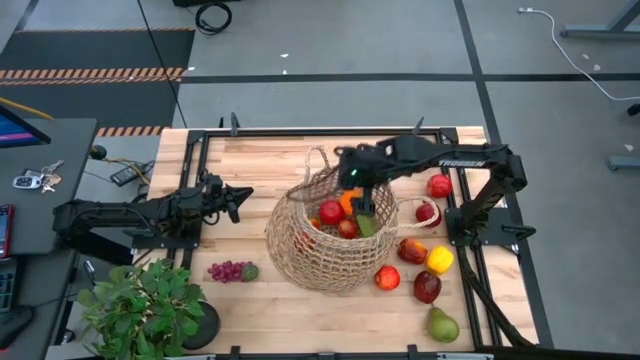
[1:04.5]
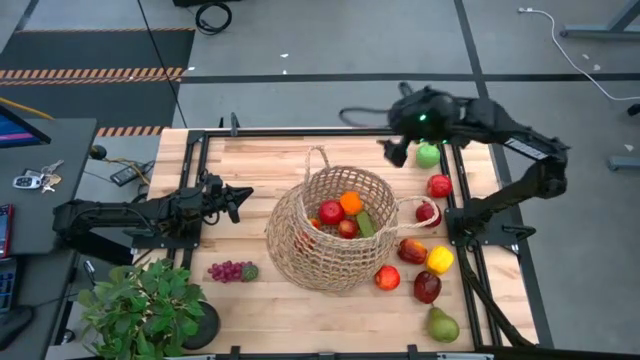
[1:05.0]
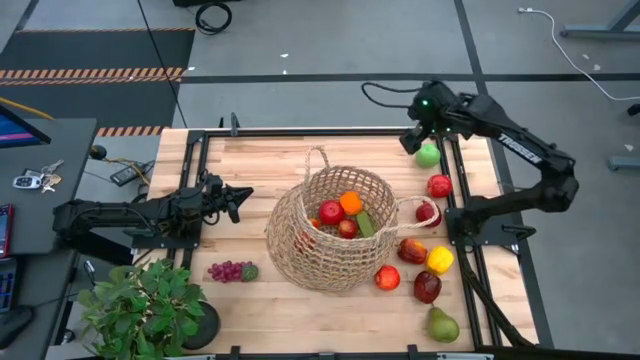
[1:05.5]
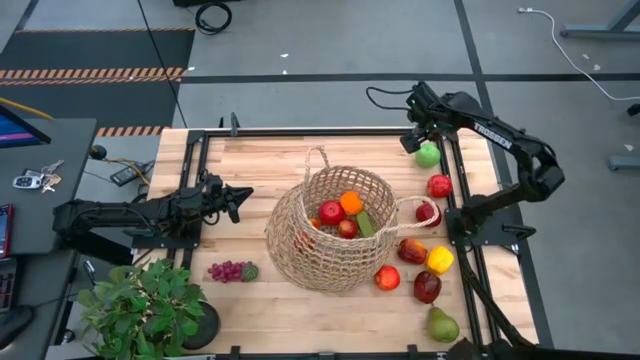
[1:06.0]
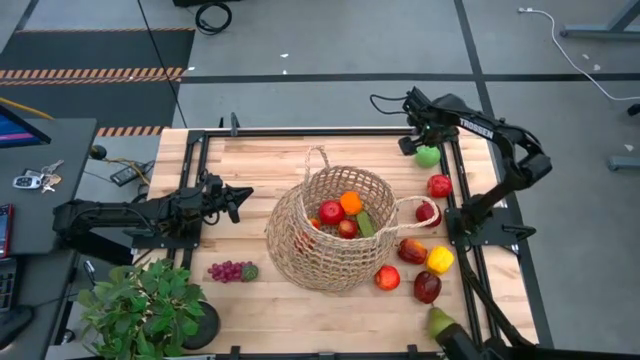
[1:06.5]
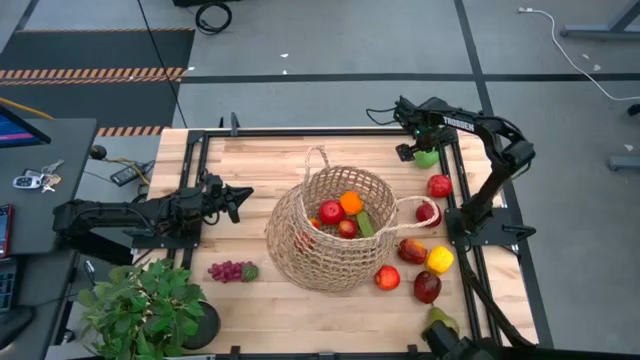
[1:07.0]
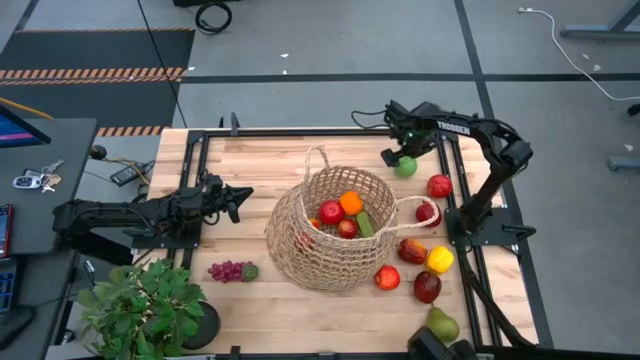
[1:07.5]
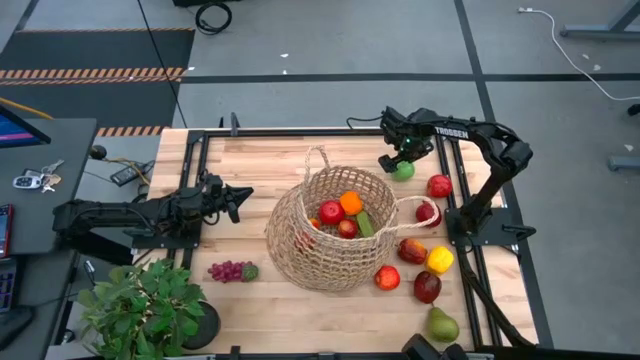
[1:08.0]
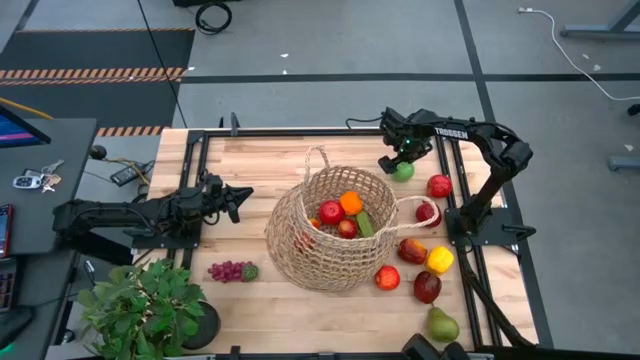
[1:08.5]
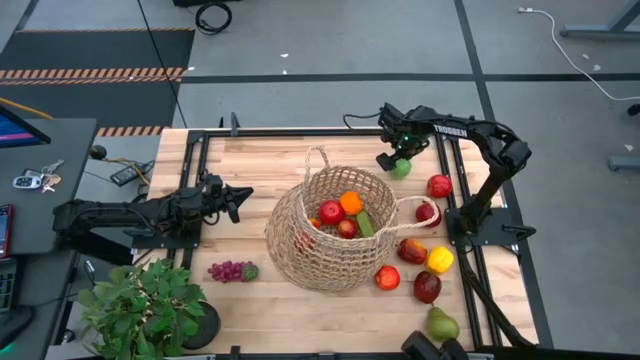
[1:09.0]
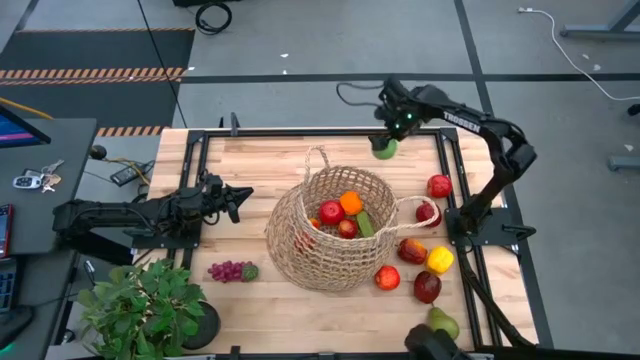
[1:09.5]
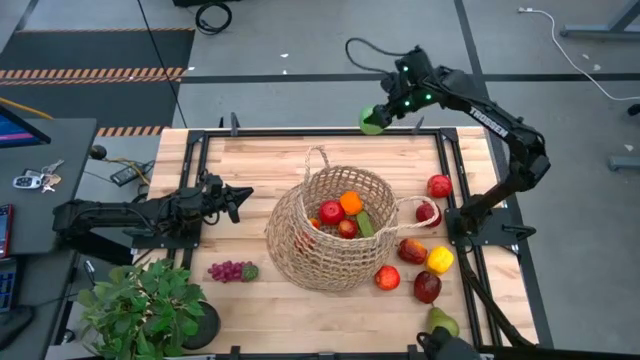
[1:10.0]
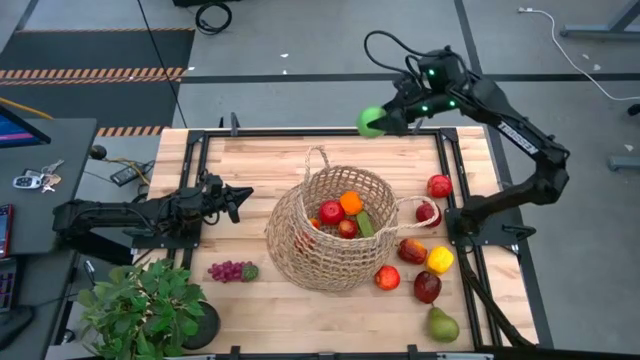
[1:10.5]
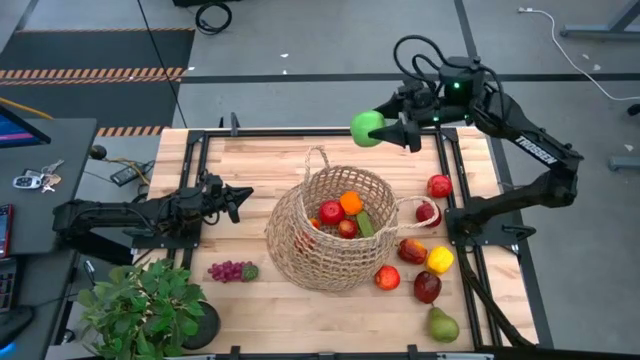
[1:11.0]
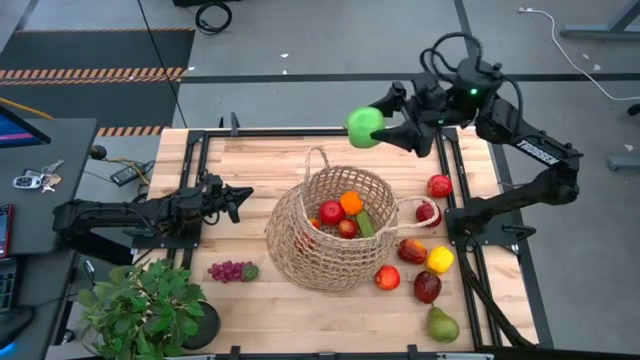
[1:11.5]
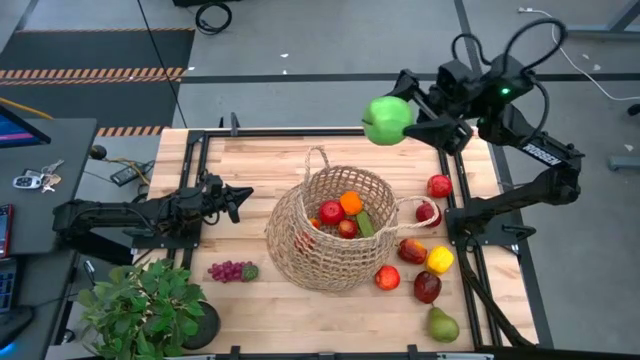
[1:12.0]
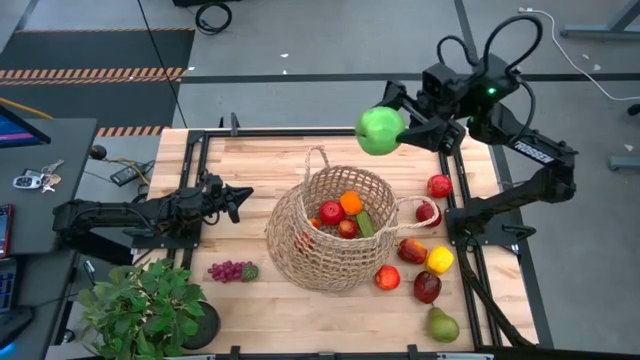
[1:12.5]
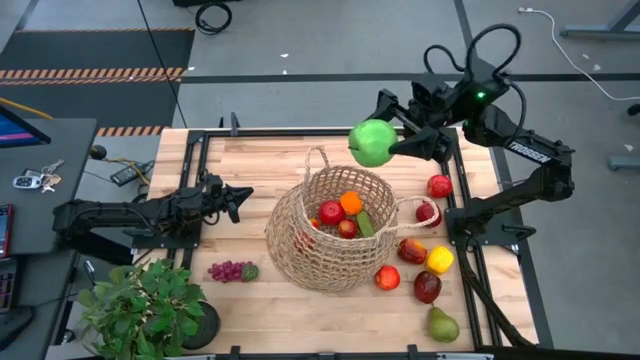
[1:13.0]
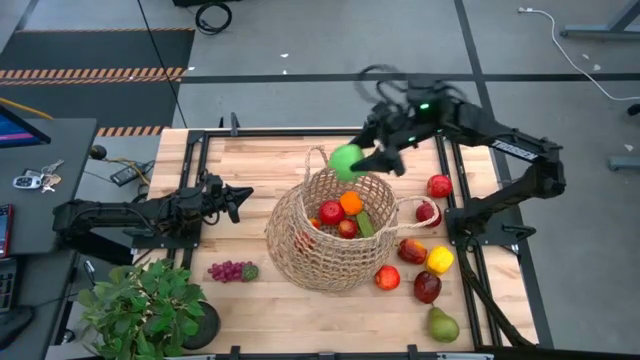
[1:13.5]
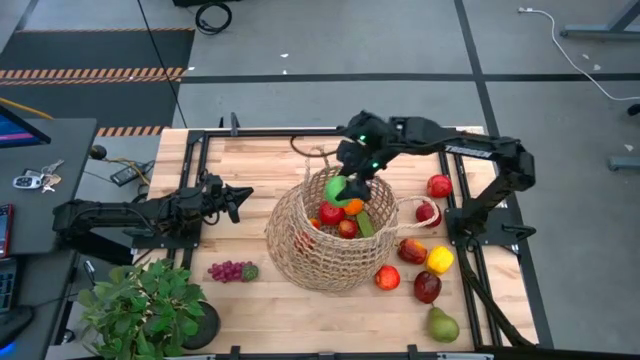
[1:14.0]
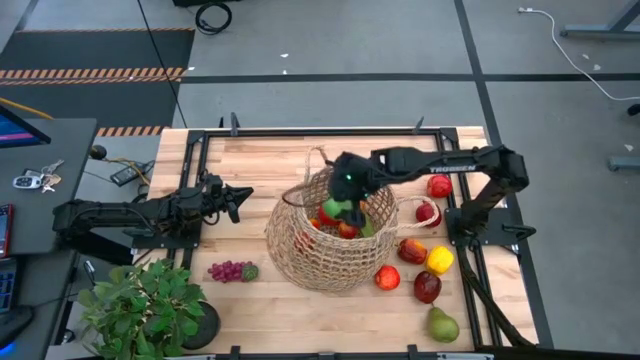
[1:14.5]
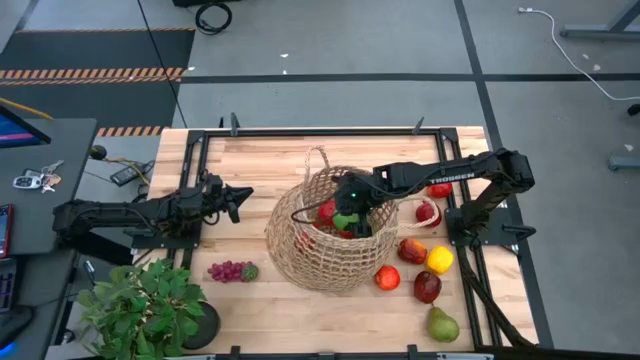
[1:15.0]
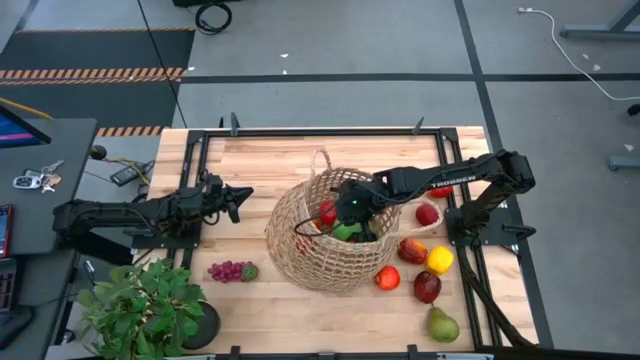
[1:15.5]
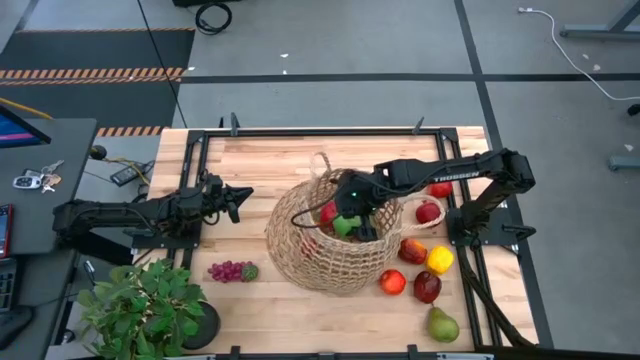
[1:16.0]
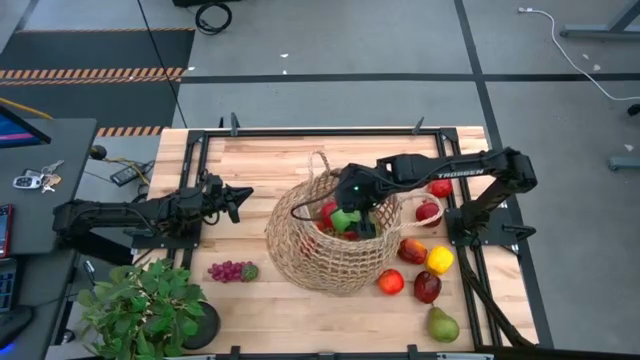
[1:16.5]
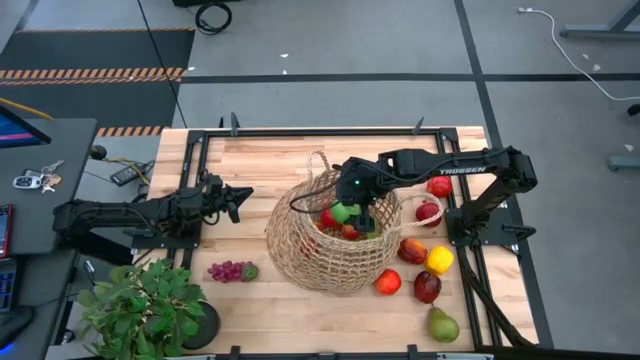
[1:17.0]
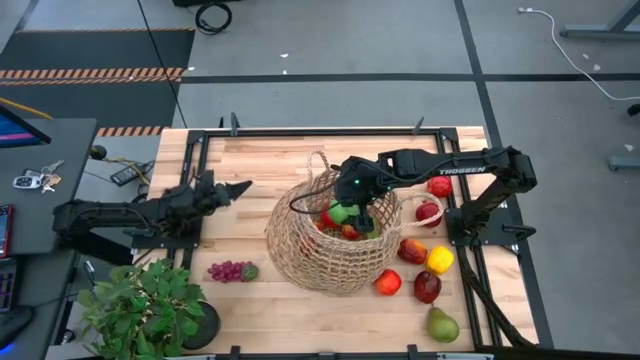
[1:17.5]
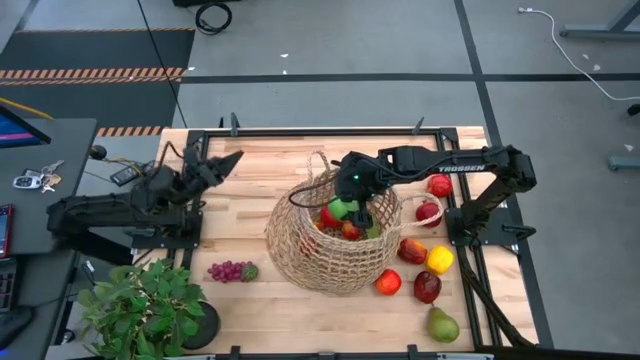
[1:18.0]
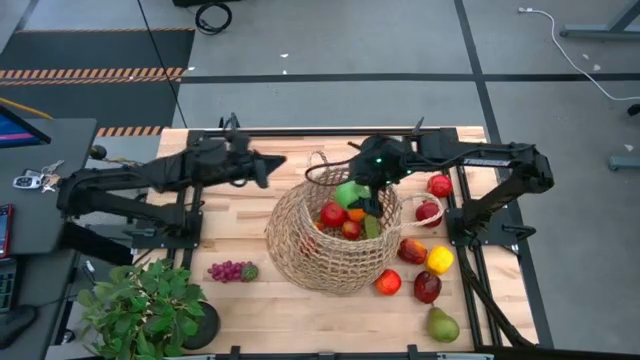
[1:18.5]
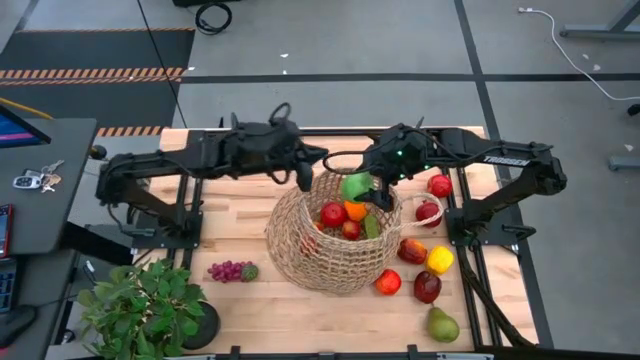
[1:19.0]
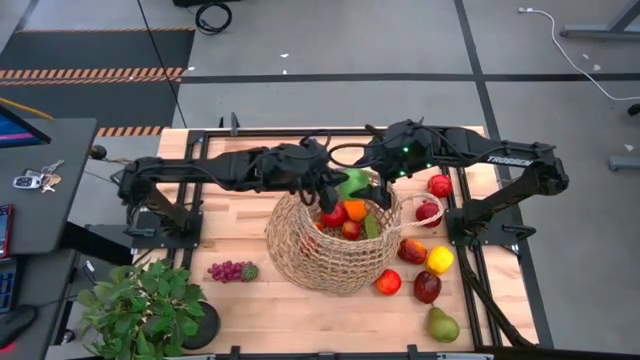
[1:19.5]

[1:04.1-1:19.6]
Task: Build produce basket
Put the green apple into the brown basket

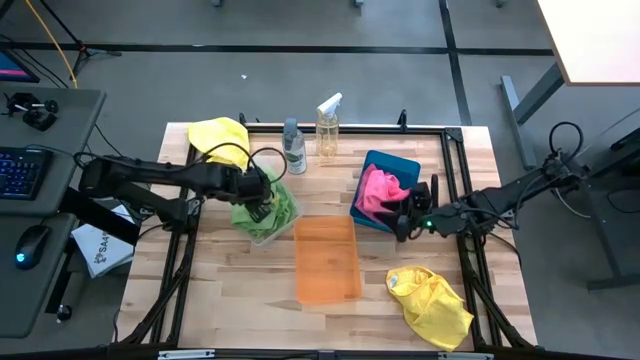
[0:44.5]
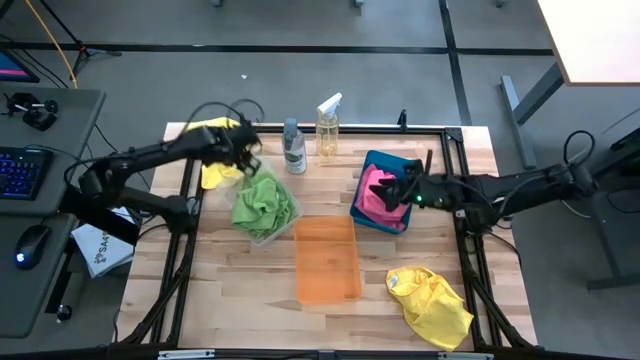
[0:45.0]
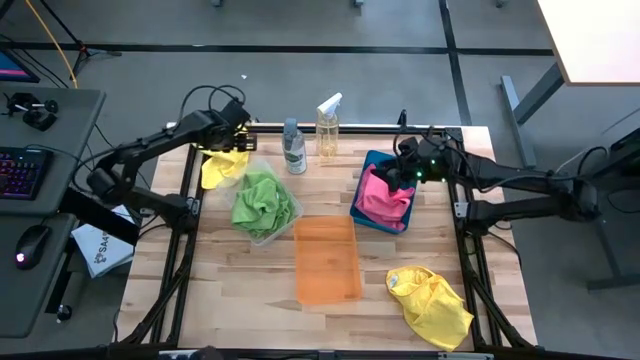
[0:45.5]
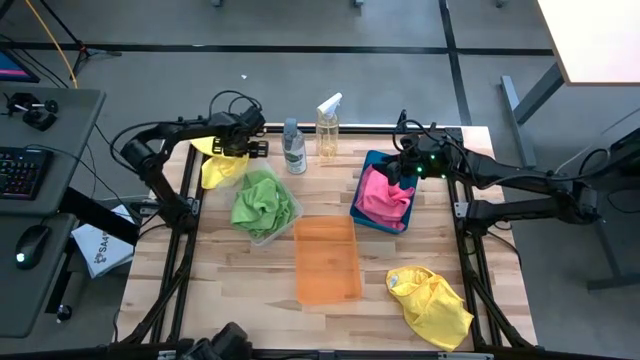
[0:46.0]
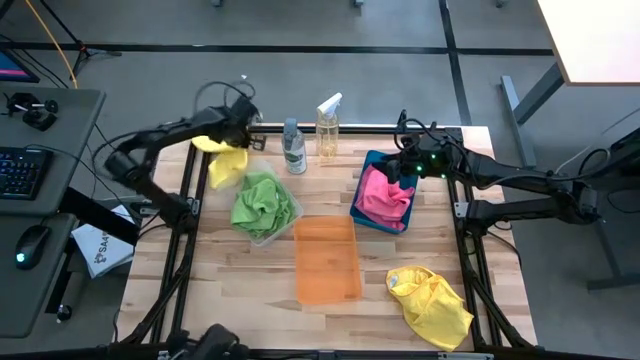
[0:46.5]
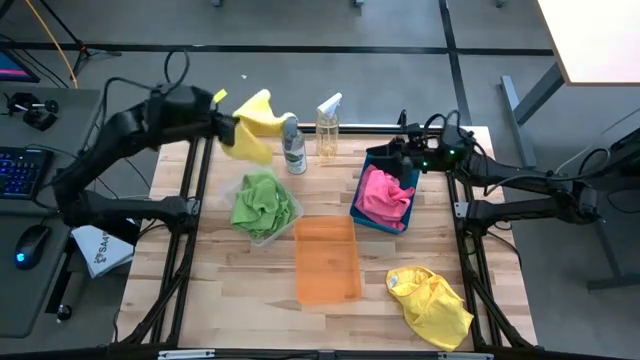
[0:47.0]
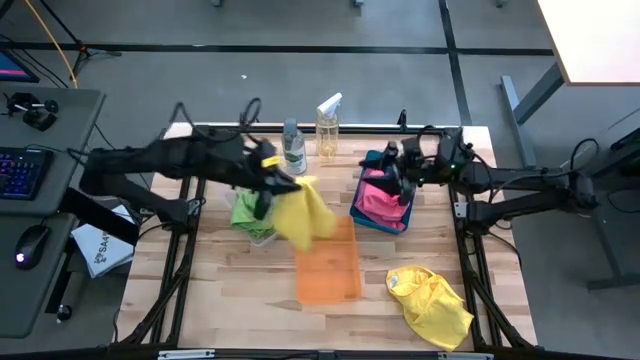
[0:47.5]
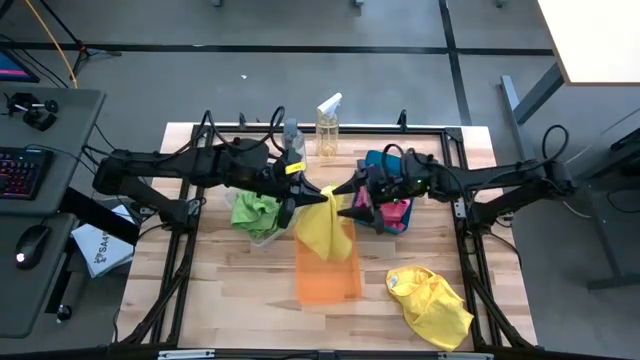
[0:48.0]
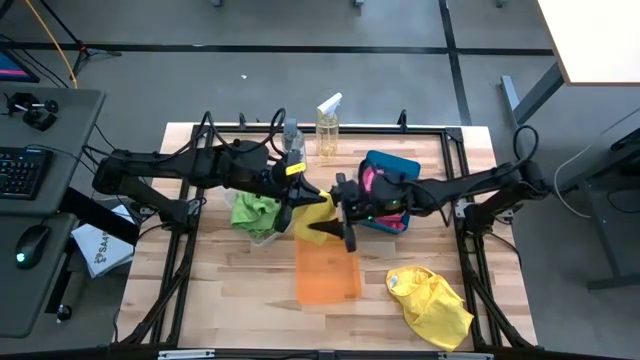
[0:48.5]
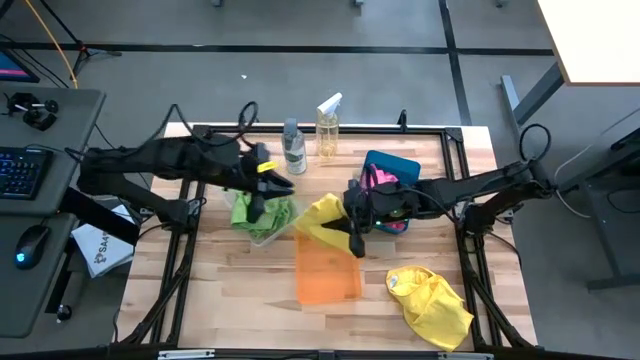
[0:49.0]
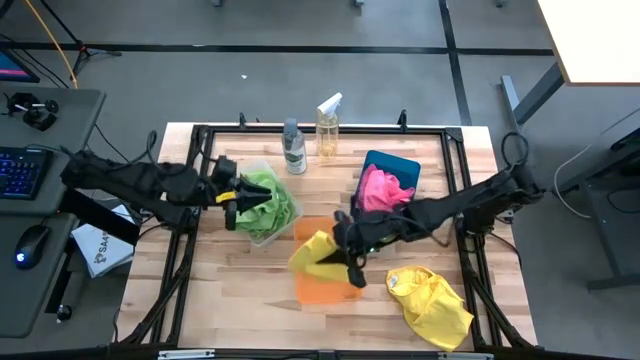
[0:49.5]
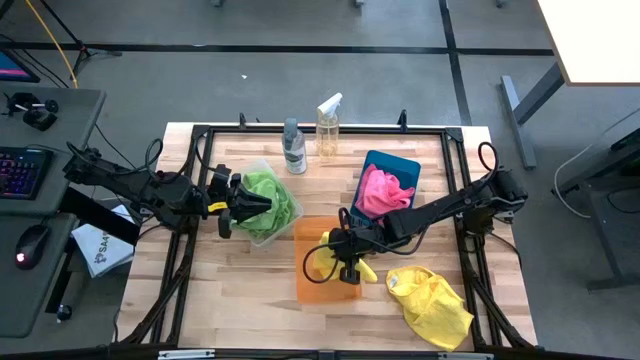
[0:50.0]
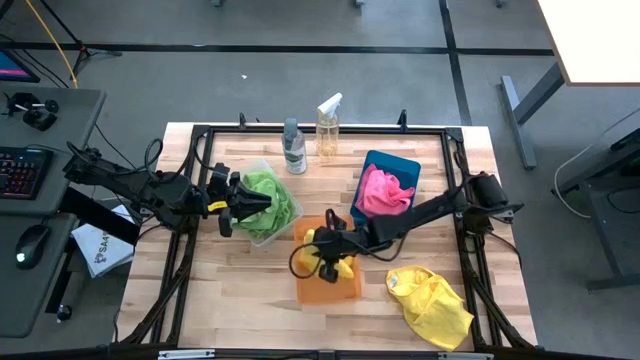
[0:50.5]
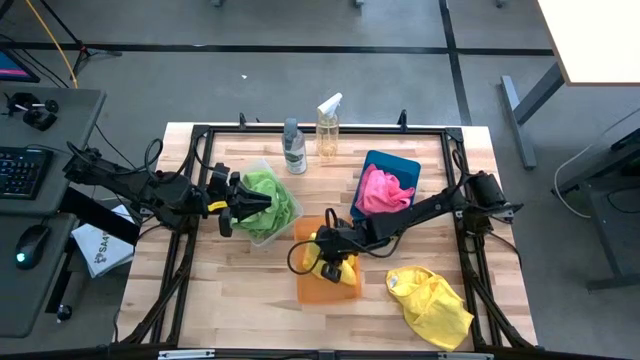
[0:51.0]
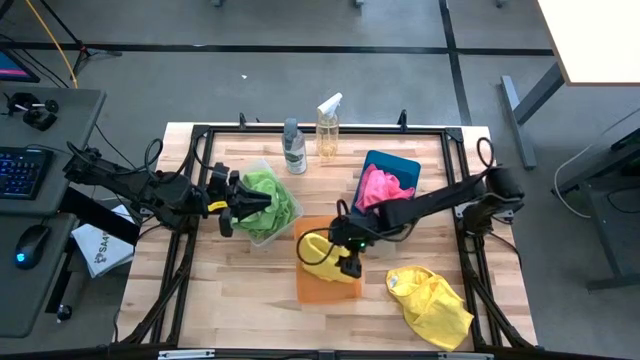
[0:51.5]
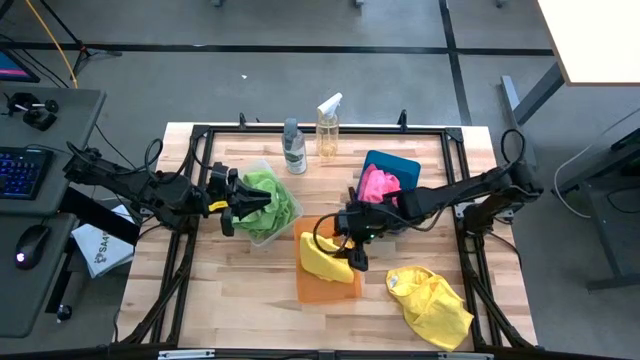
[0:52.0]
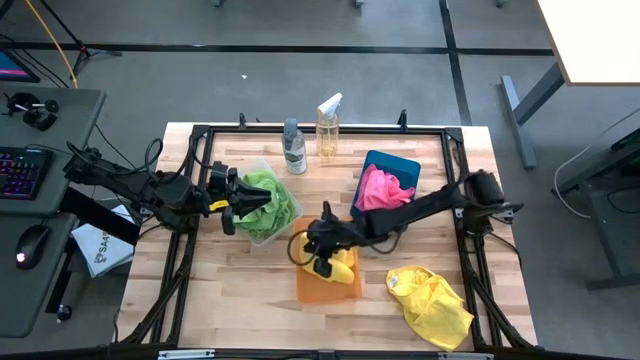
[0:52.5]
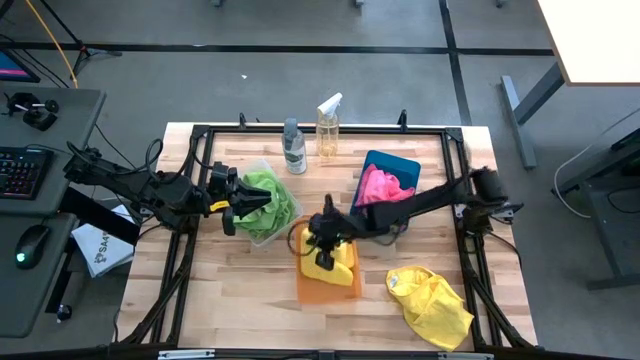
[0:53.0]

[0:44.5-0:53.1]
Task: Sort microfiber towel by color & place in baskets
Put the yellow microfiber towel into the orange bin
